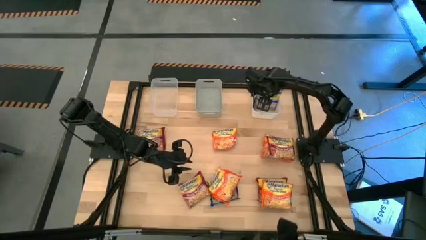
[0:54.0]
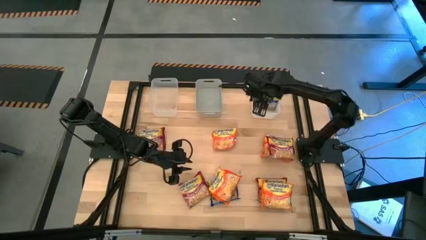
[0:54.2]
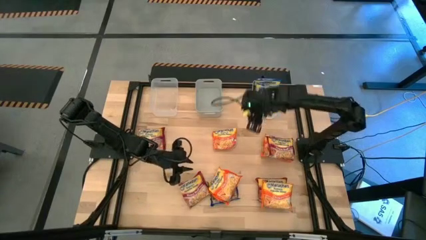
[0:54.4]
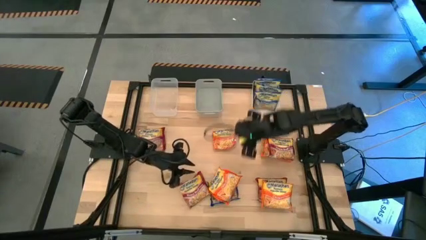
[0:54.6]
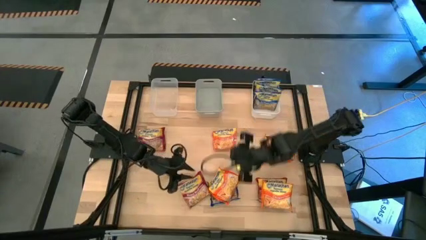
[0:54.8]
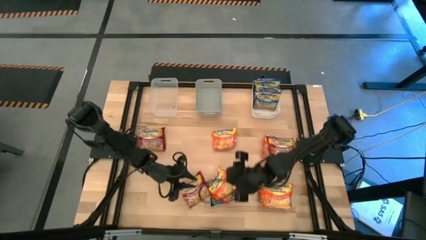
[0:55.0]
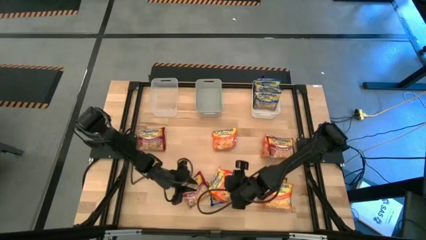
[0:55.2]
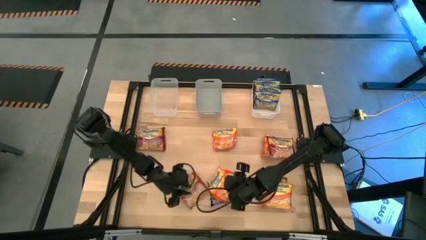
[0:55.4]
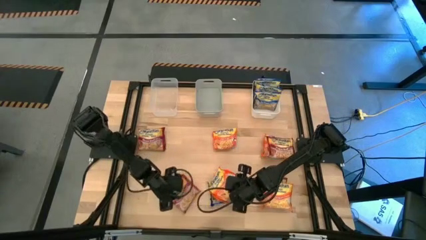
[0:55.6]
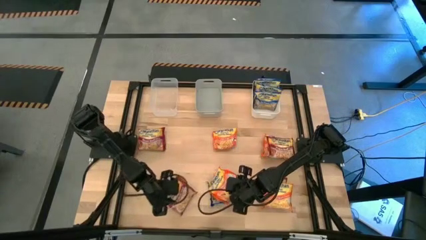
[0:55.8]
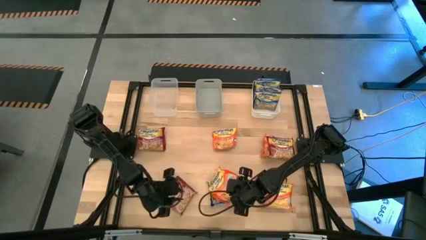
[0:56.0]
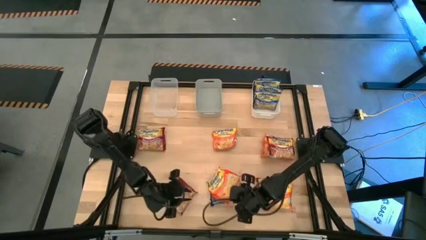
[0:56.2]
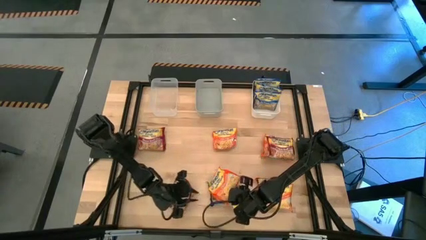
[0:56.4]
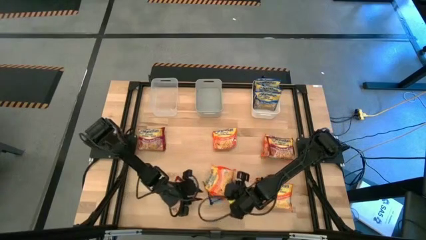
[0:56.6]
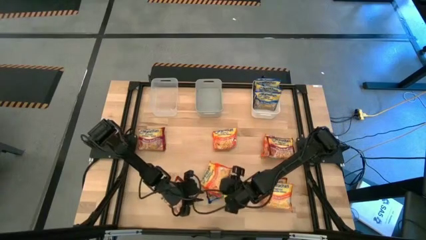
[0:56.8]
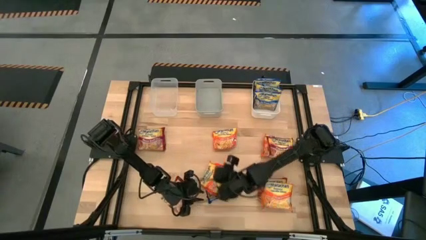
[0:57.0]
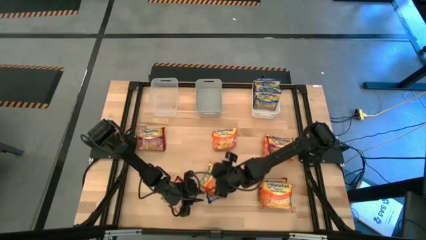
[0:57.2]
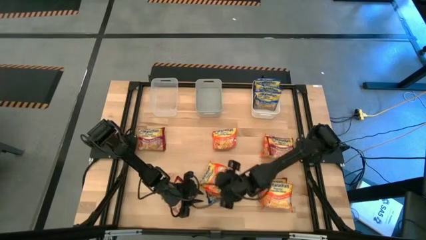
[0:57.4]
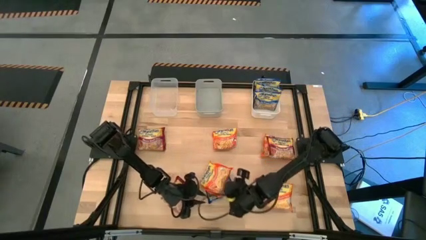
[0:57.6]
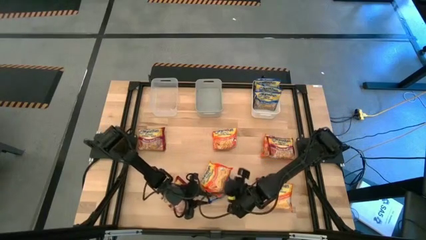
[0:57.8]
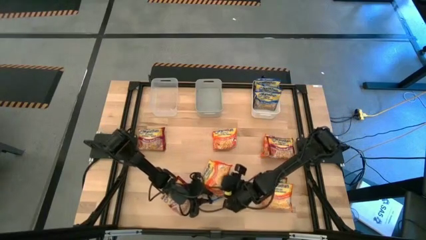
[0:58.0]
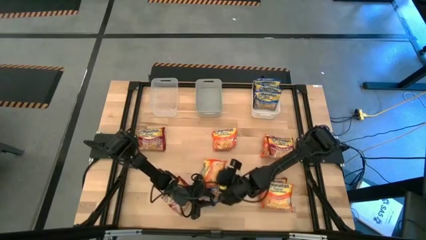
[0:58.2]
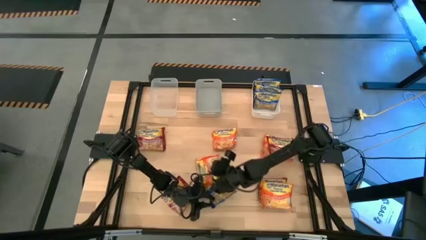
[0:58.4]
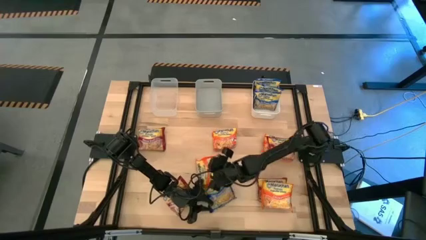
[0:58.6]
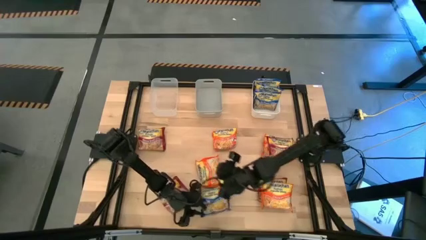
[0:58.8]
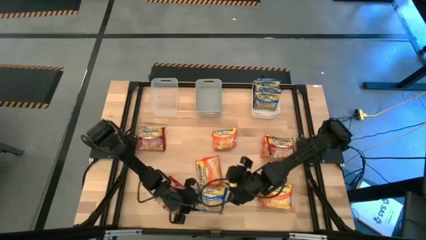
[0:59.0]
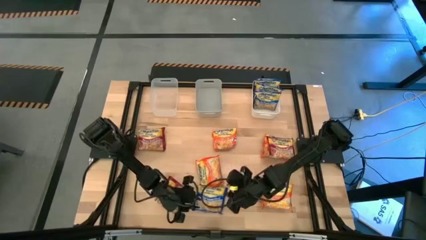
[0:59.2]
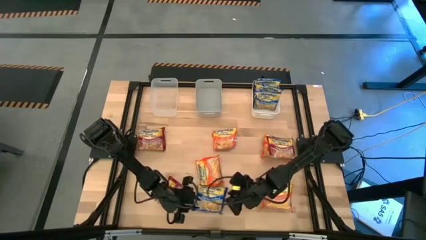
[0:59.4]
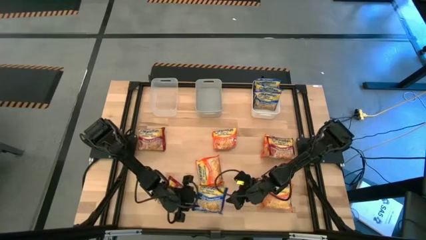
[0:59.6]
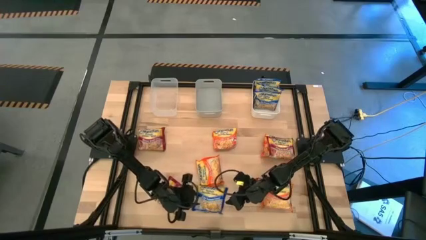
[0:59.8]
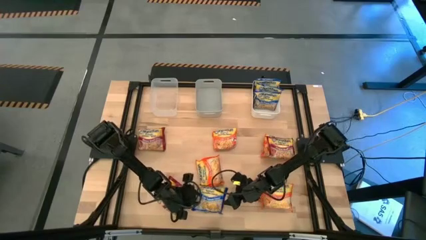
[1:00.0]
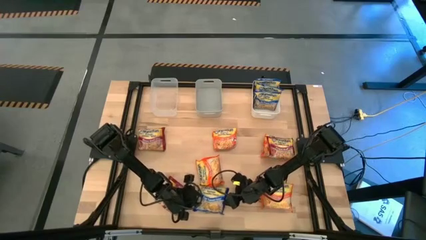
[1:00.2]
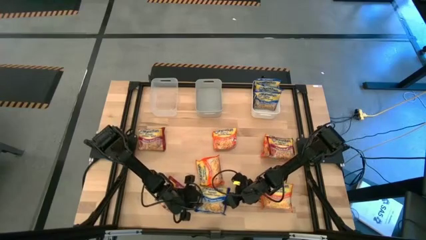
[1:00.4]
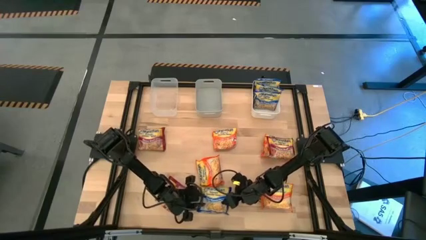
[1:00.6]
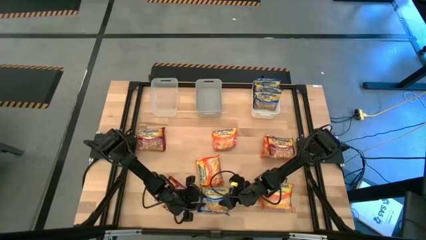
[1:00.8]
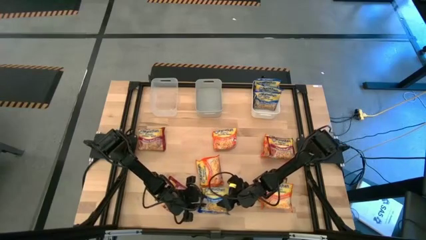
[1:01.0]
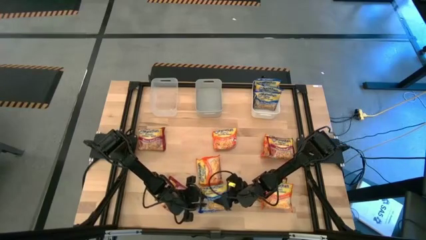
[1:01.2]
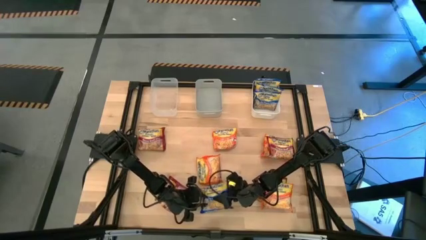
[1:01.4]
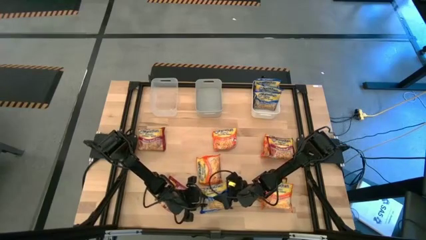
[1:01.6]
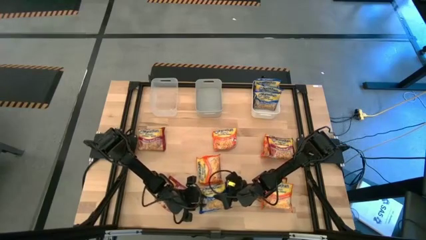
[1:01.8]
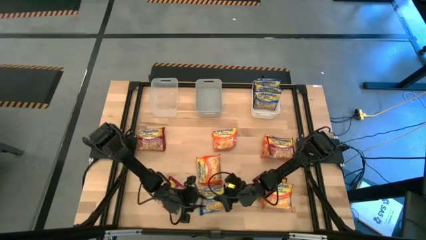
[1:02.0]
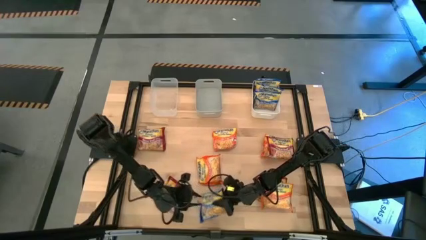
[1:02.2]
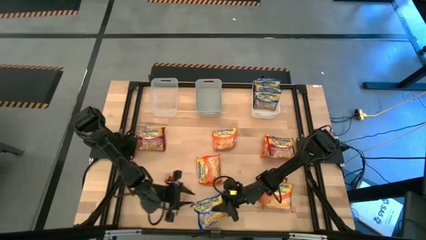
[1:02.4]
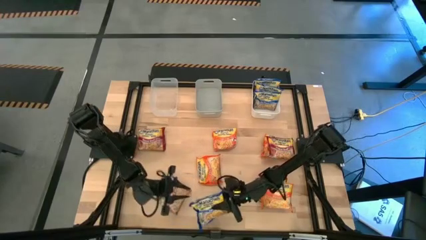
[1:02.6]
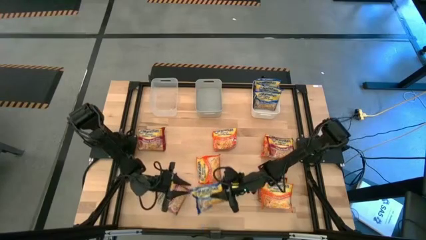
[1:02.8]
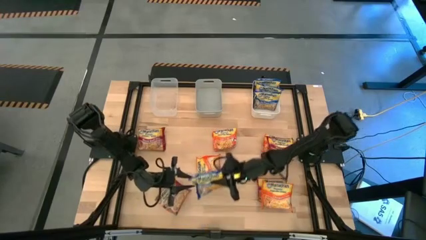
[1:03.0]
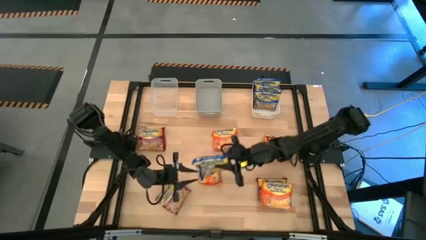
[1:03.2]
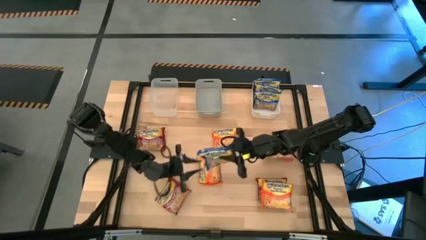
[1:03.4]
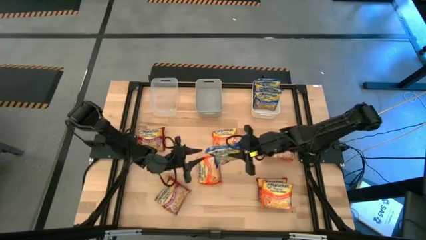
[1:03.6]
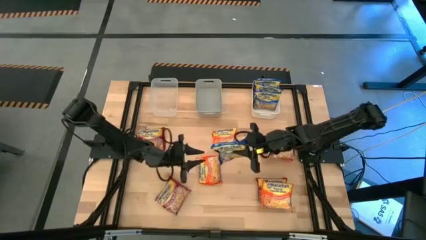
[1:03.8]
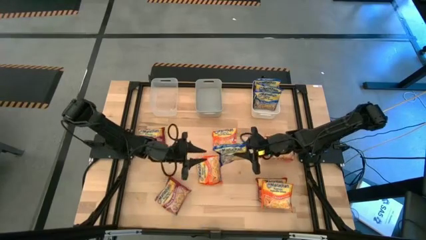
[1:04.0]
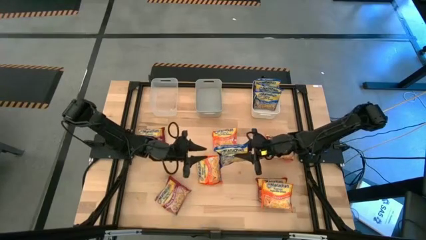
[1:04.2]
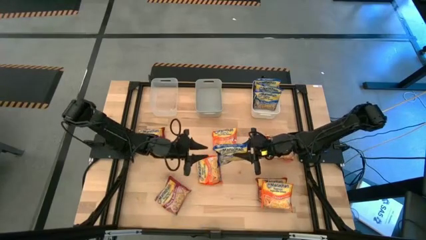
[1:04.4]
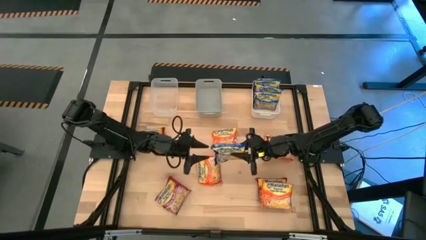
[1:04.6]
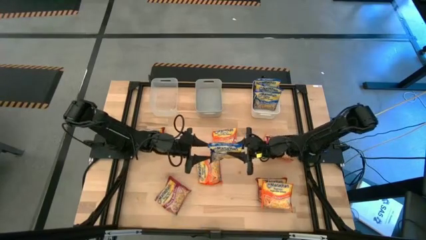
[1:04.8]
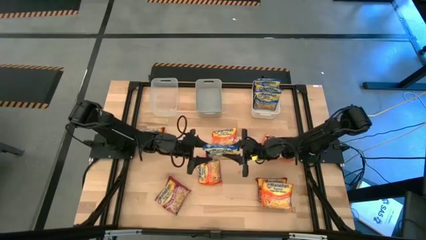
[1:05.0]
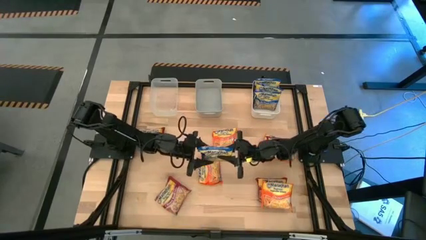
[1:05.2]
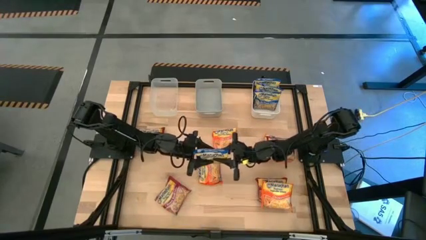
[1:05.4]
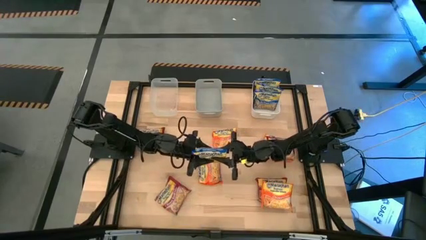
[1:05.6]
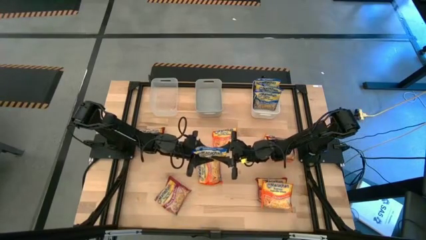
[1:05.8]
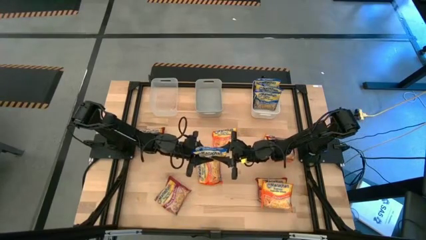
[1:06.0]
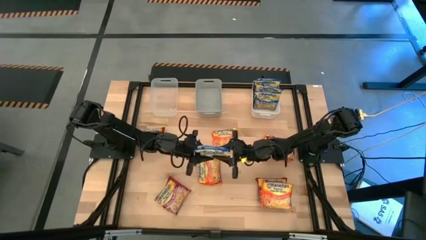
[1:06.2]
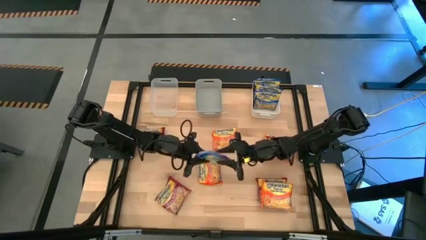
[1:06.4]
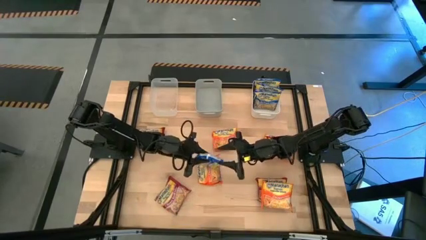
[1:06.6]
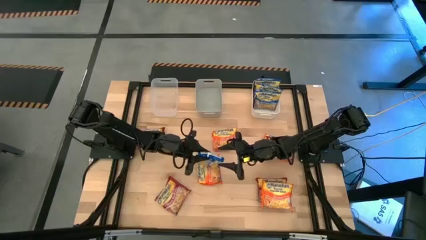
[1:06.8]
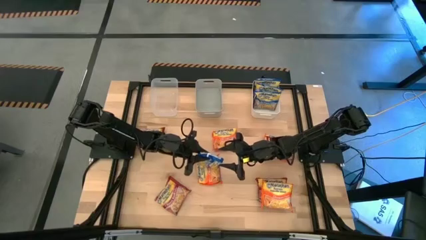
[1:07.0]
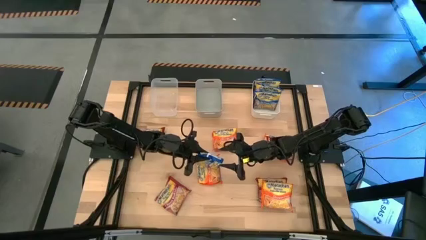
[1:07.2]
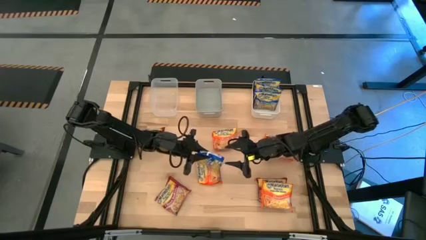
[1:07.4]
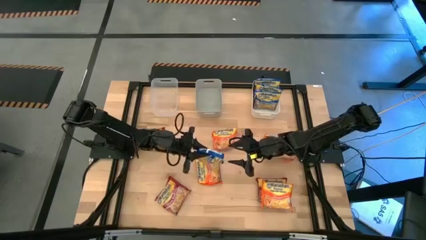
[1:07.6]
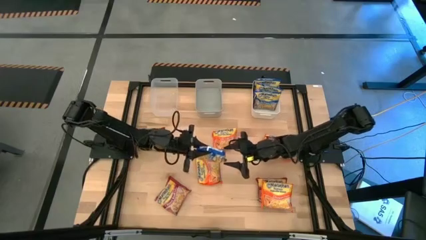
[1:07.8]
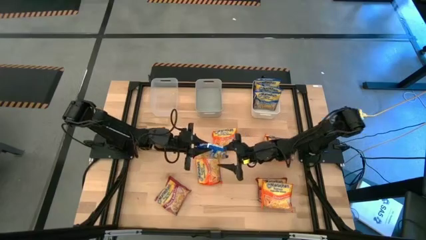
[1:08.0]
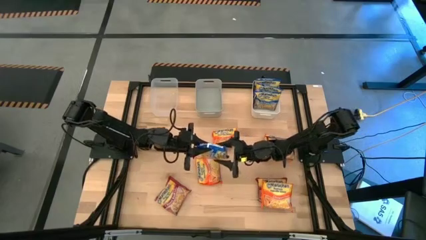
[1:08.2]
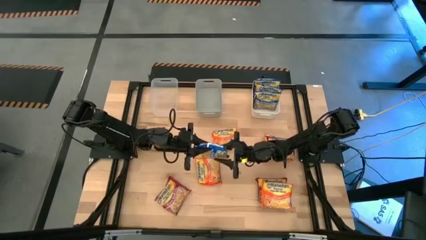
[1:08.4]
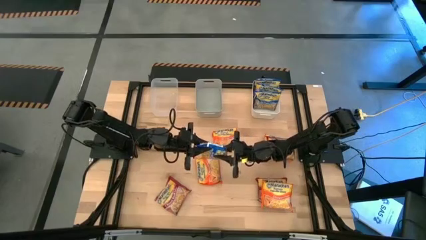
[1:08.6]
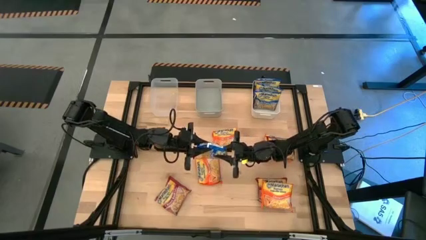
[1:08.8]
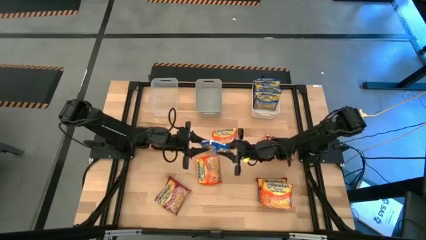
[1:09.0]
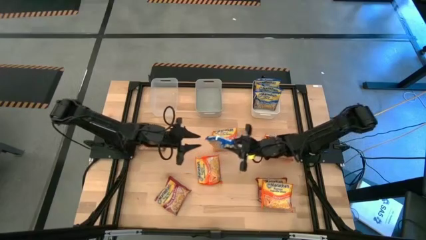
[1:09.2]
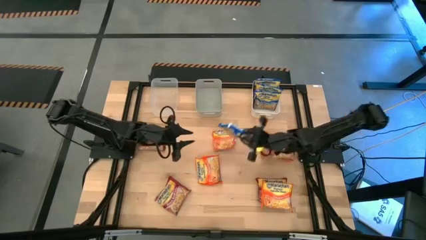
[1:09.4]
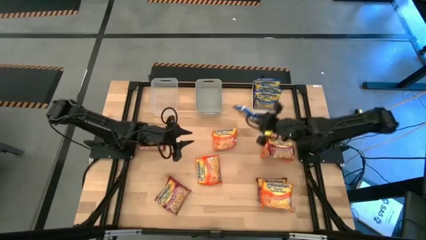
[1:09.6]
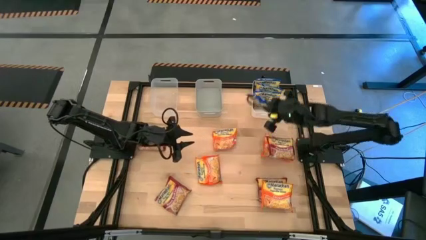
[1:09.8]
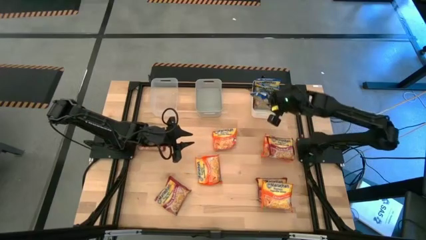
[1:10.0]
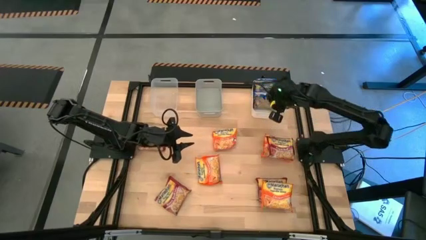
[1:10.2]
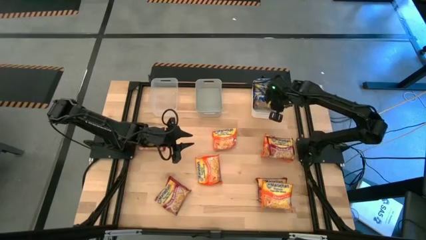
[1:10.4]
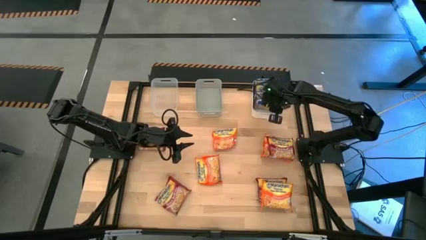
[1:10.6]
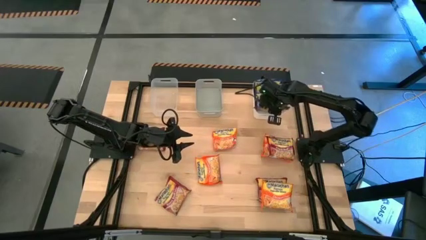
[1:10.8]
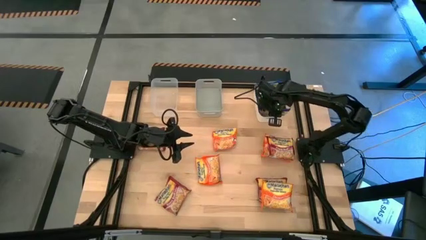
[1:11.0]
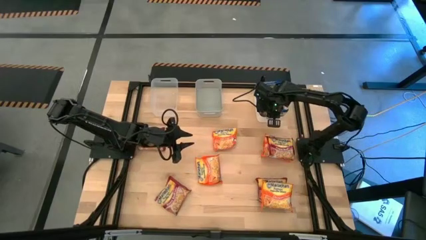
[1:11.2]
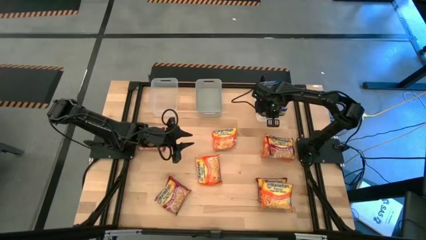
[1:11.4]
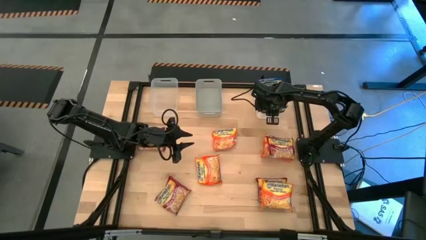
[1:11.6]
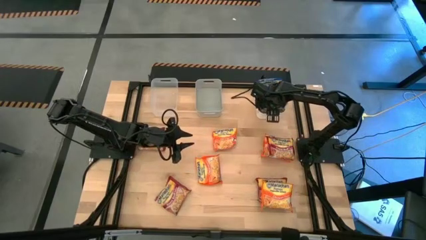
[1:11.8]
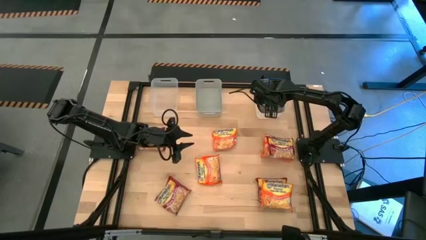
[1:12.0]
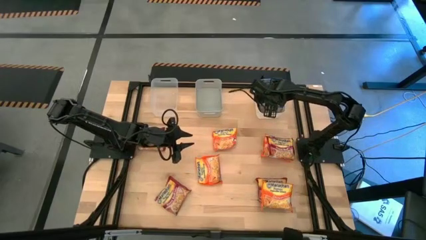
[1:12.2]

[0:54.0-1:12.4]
Task: Sort Maruchan noodles
Put the blue noodle pack into the white bin
